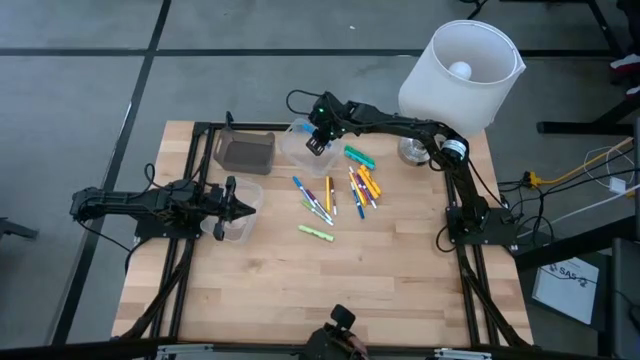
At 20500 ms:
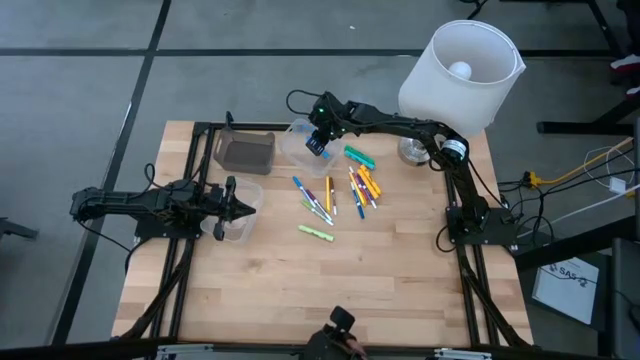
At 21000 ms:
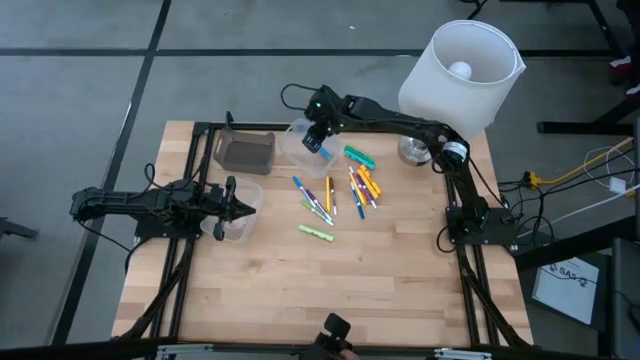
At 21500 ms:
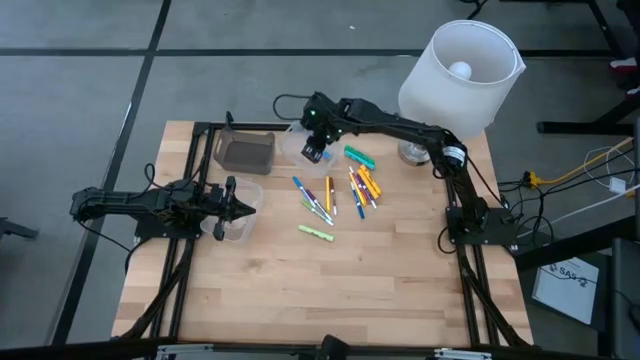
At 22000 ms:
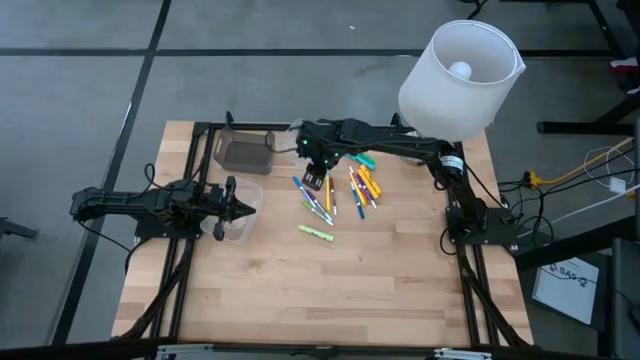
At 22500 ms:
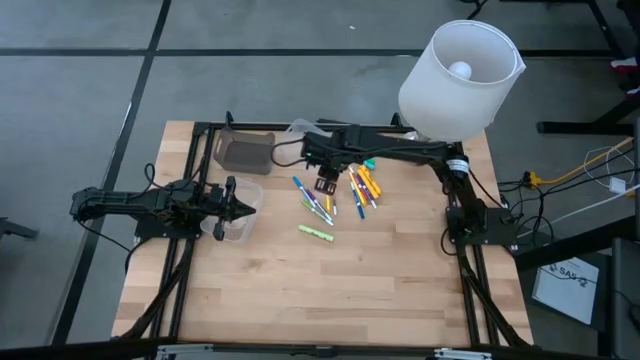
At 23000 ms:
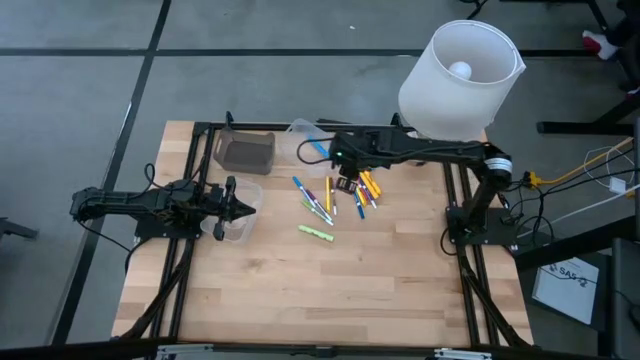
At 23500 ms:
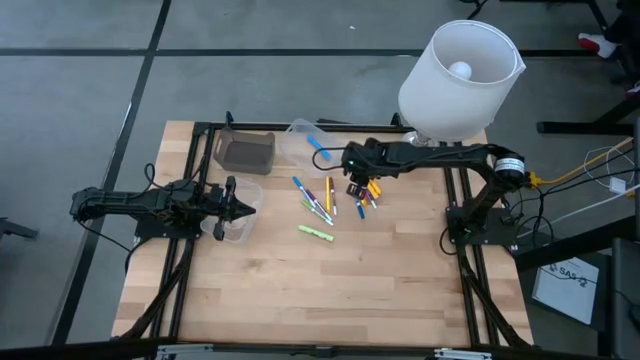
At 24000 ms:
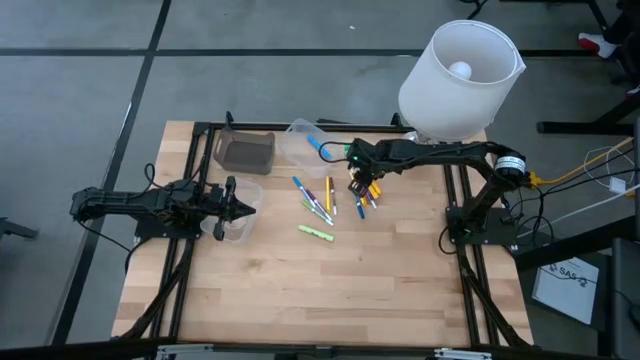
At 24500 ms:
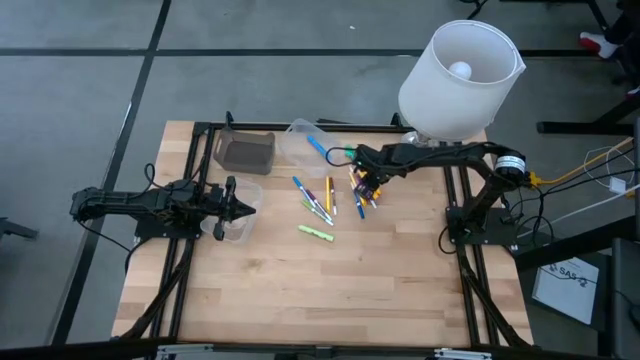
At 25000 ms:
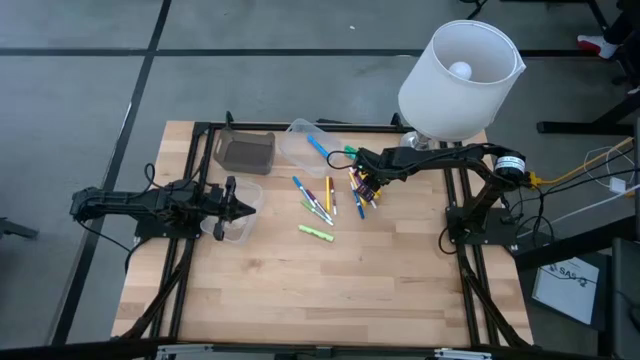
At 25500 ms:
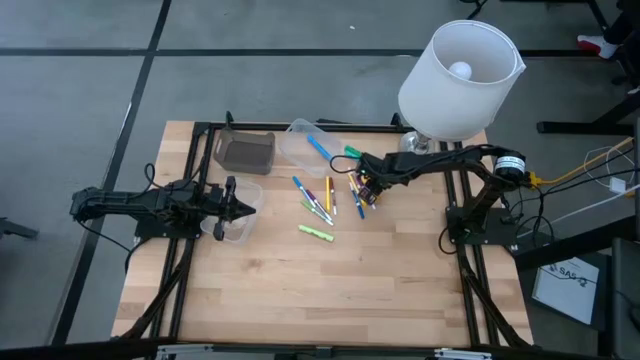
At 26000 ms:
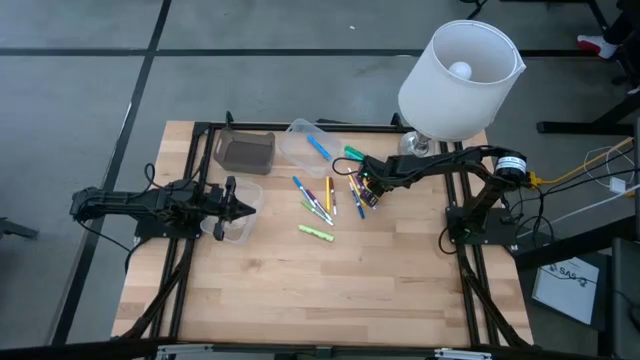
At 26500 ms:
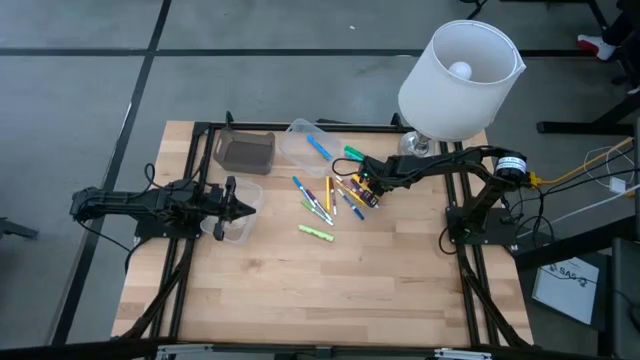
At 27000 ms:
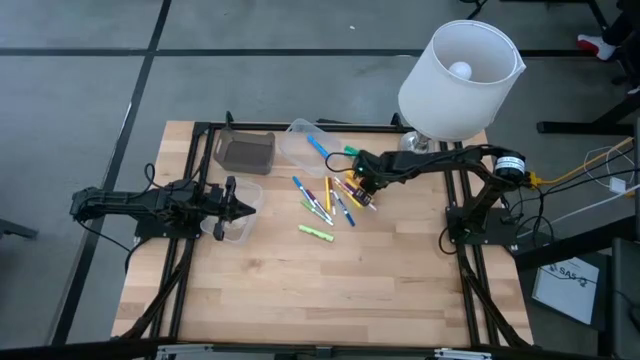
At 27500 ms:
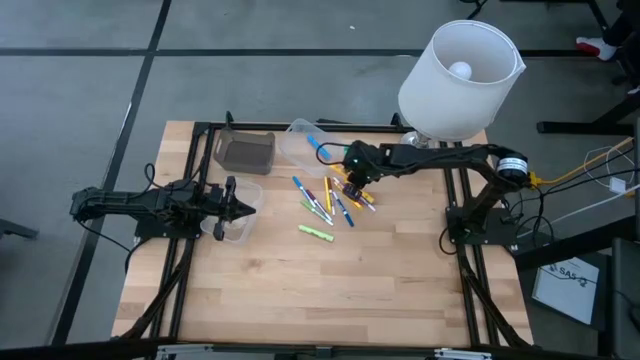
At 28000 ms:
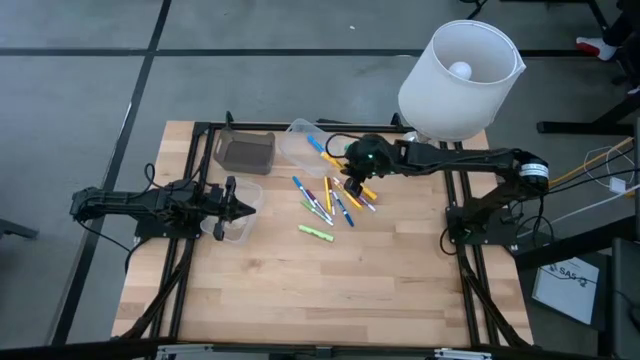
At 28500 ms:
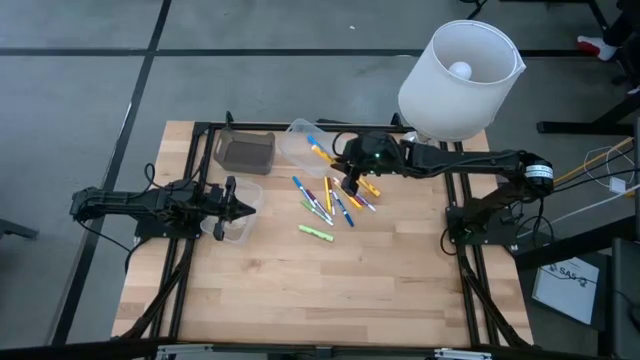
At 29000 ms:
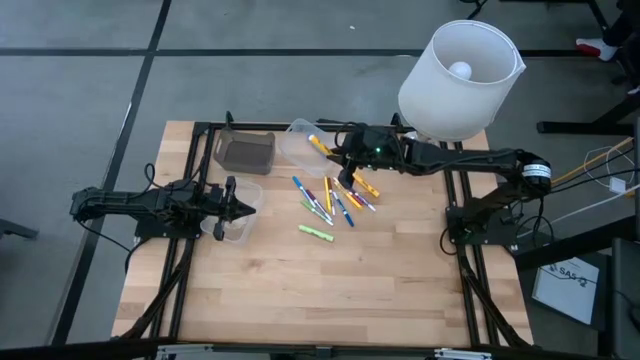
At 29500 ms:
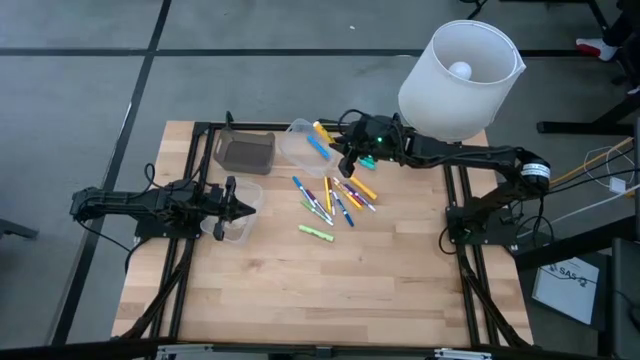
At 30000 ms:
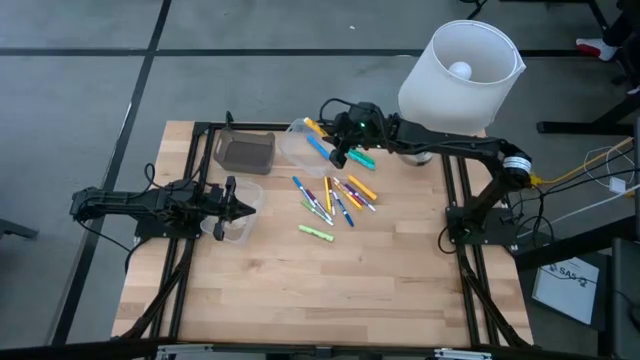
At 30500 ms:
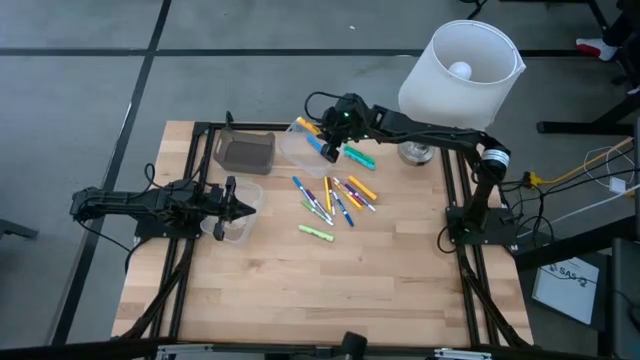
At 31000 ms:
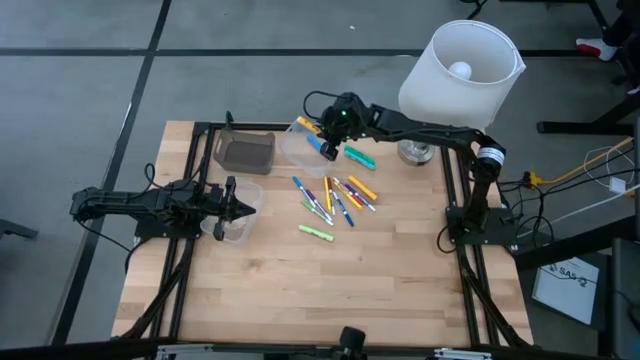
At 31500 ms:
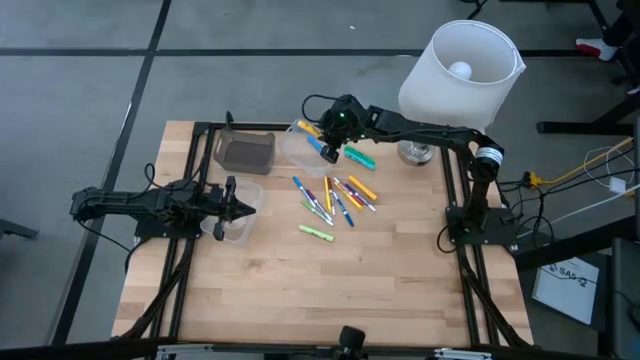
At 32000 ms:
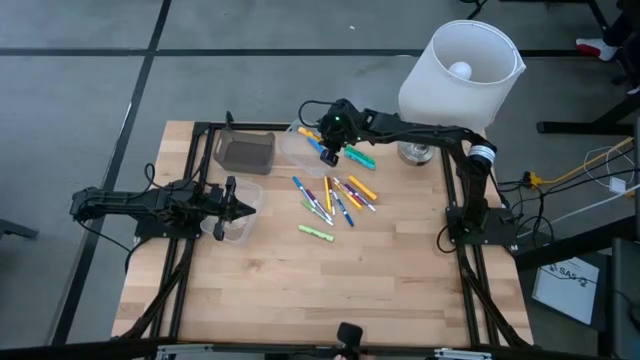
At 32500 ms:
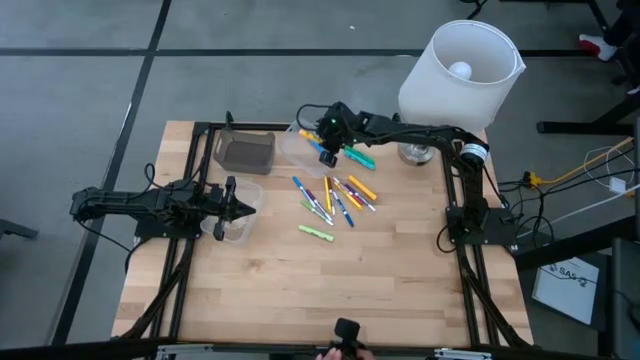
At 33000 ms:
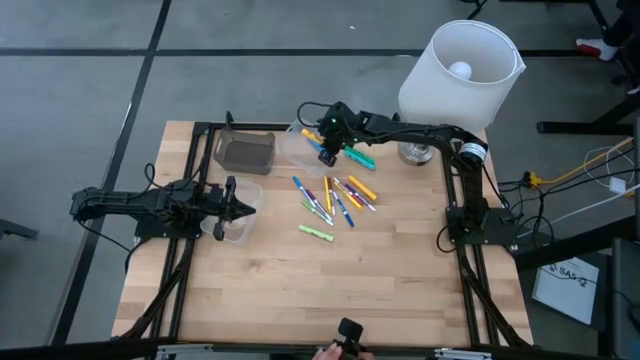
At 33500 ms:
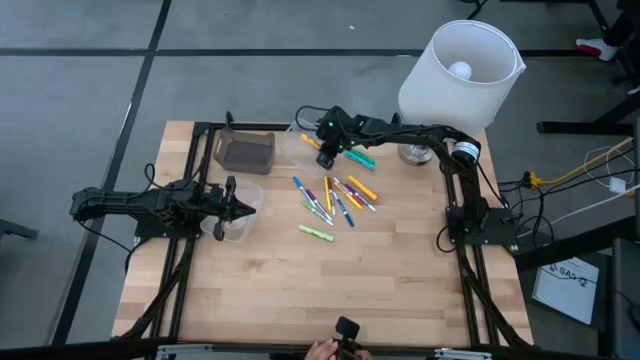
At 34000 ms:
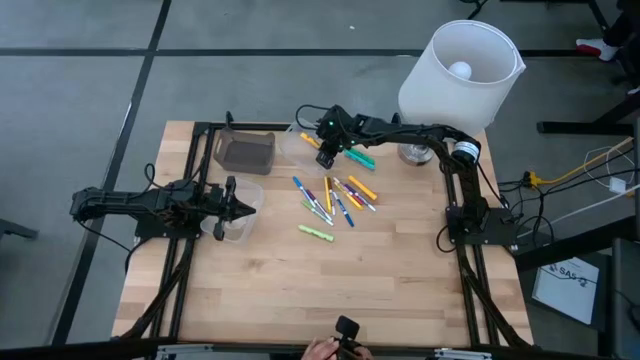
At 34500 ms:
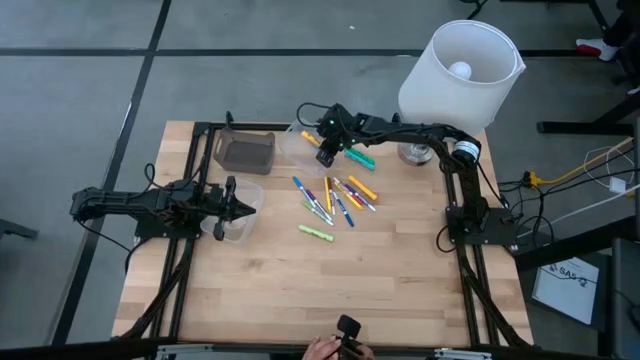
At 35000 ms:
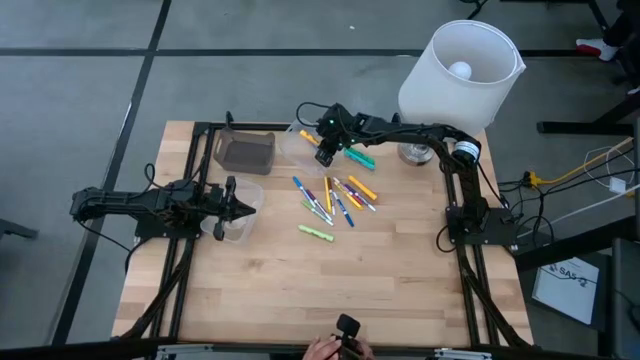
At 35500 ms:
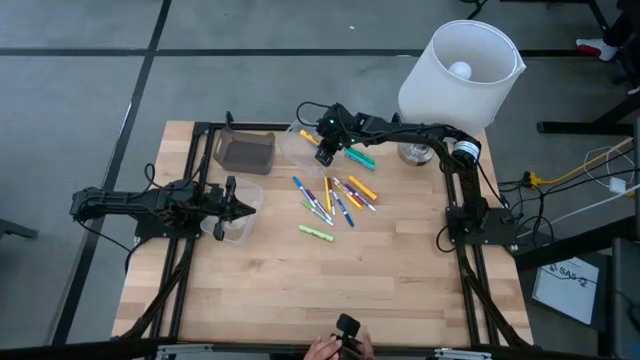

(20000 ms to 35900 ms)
Task: Pick & Place Markers
Put the right yellow highlighter into the top transparent bin

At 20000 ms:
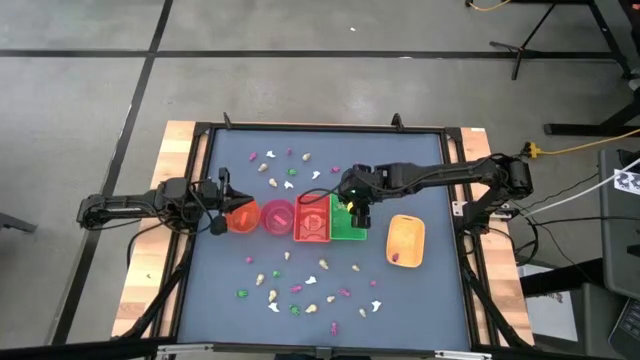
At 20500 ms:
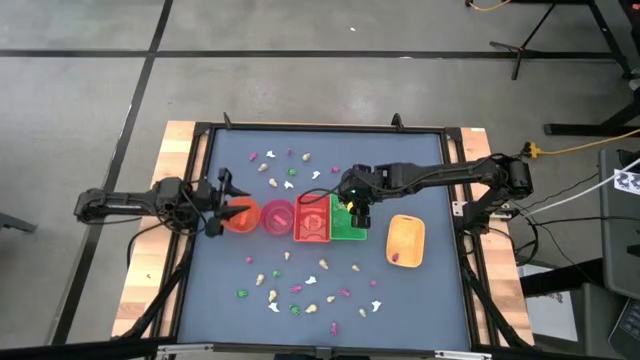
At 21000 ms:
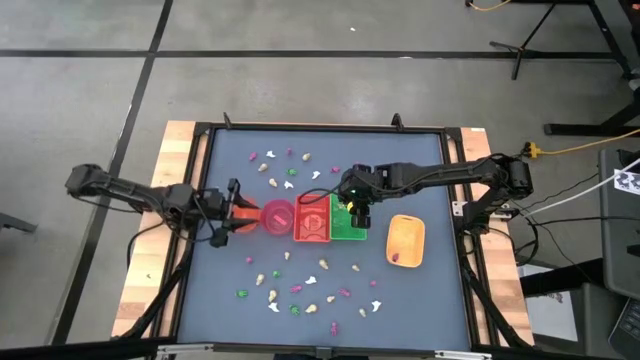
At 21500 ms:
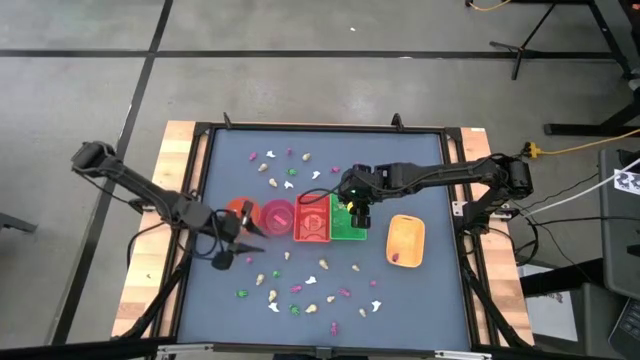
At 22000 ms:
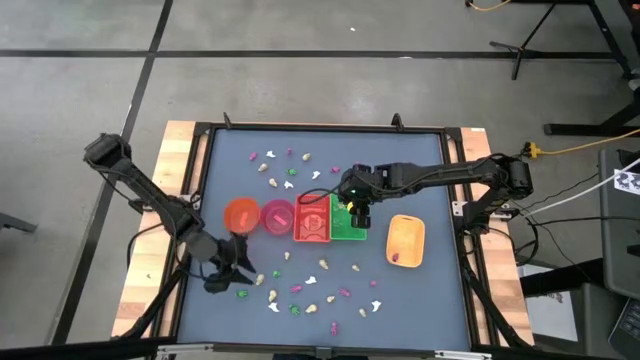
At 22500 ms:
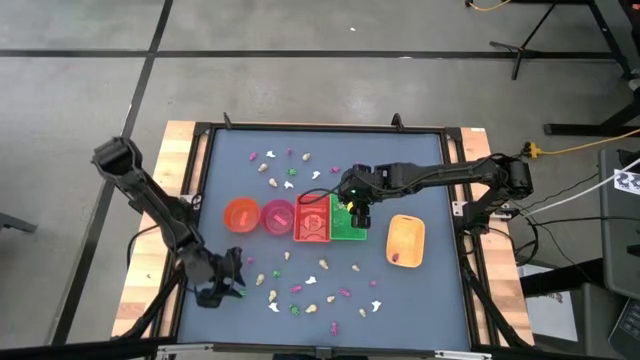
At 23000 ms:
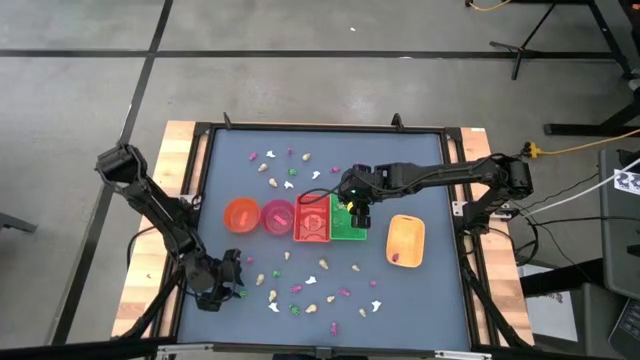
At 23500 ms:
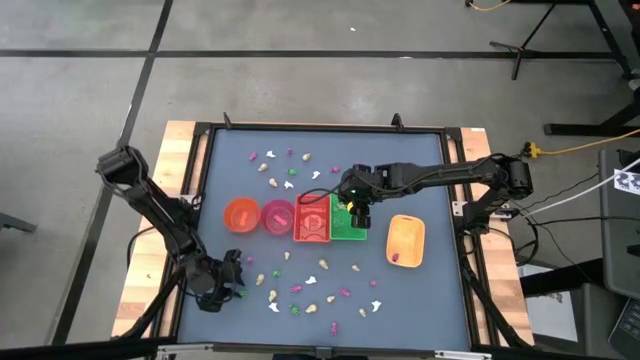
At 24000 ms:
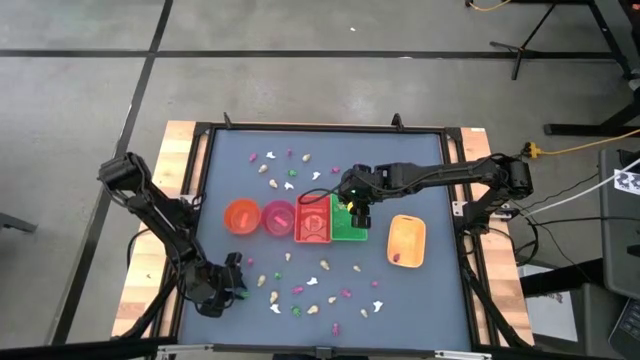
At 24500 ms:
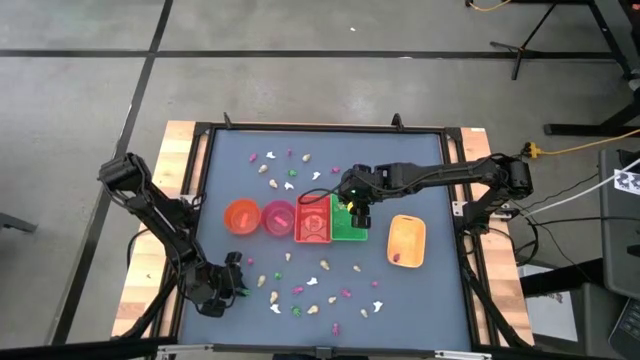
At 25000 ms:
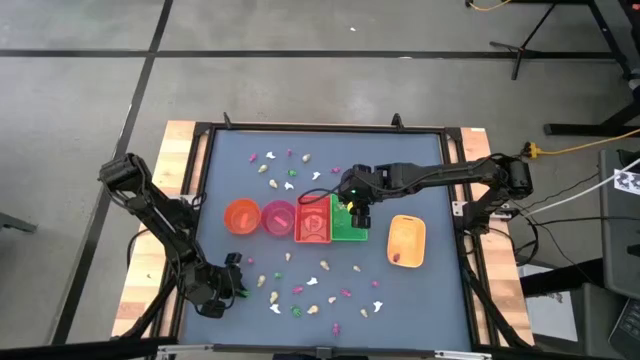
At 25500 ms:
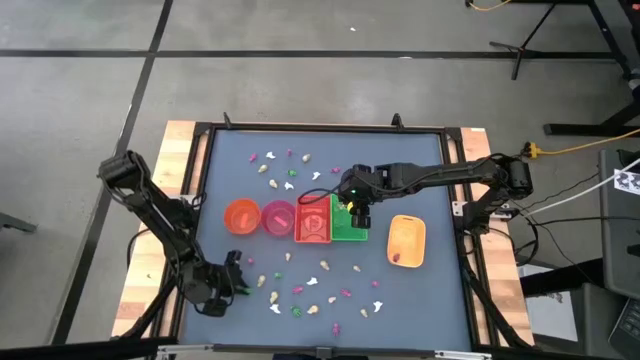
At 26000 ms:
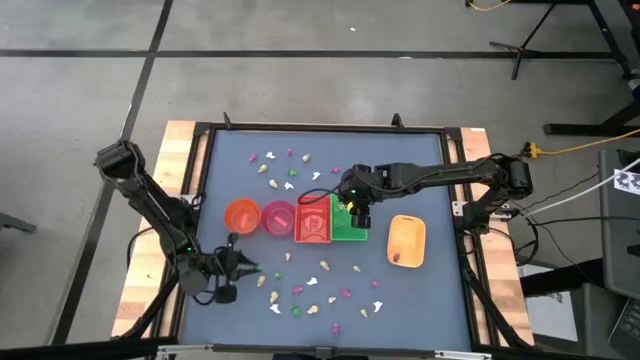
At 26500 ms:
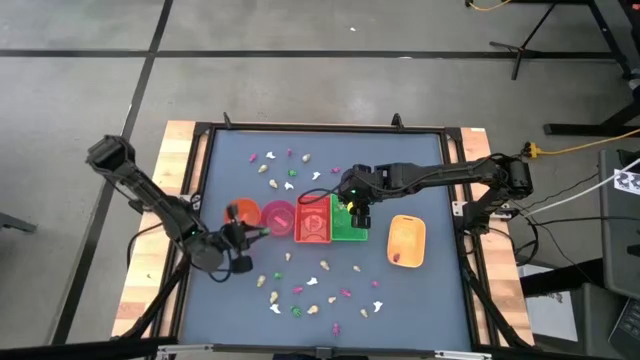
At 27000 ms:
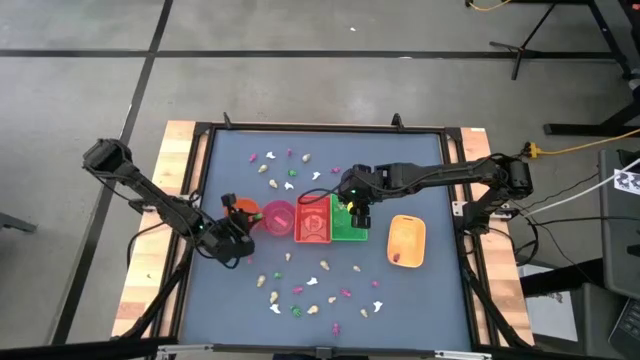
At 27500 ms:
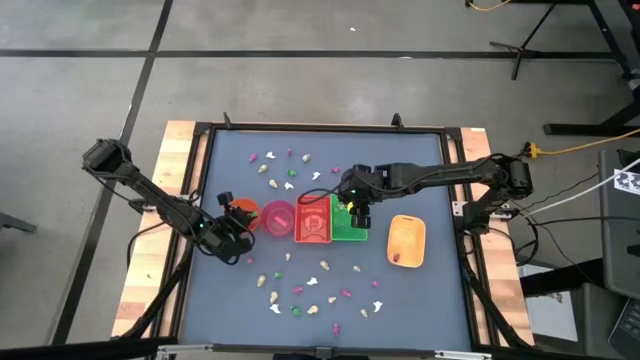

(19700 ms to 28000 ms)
Task: Sort Halloween decoration
Put the green skeleton toy into the orange bowl
